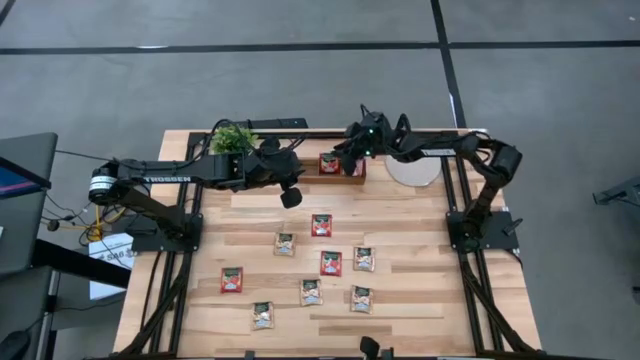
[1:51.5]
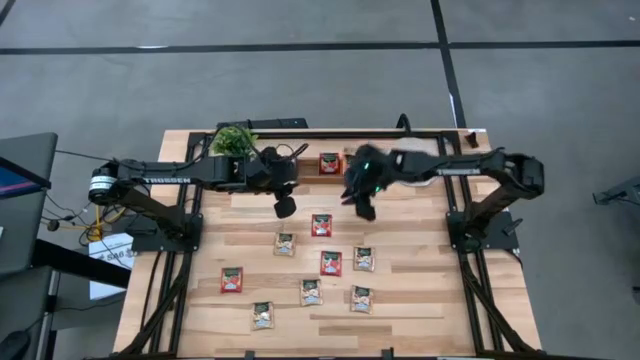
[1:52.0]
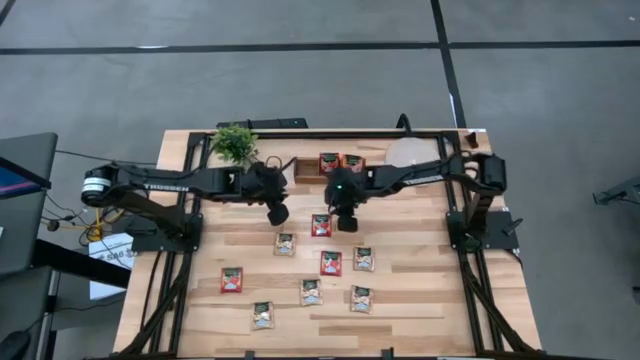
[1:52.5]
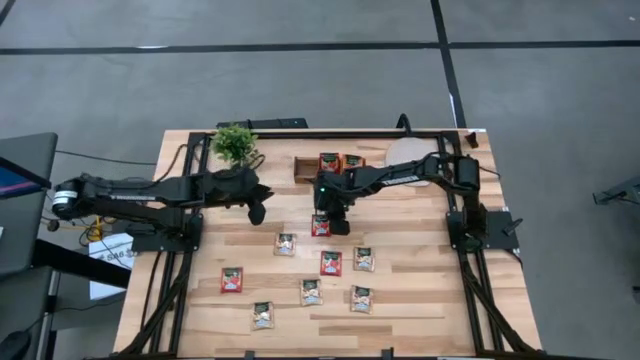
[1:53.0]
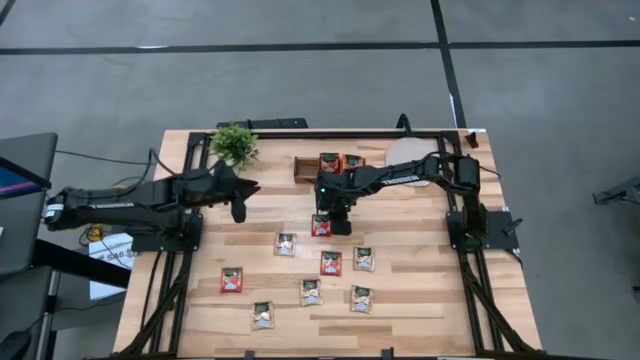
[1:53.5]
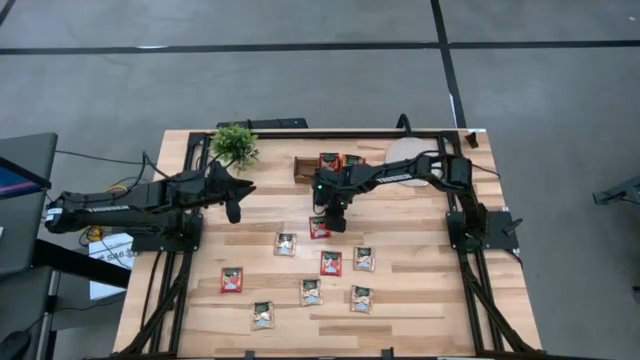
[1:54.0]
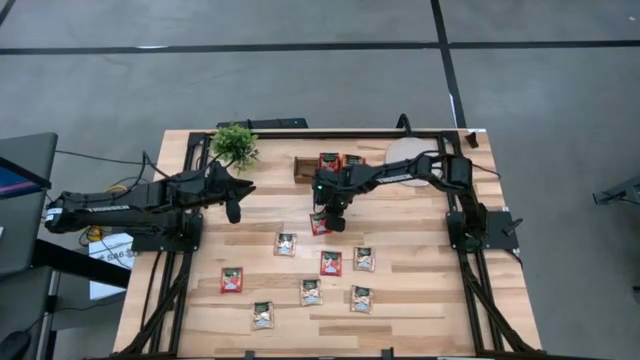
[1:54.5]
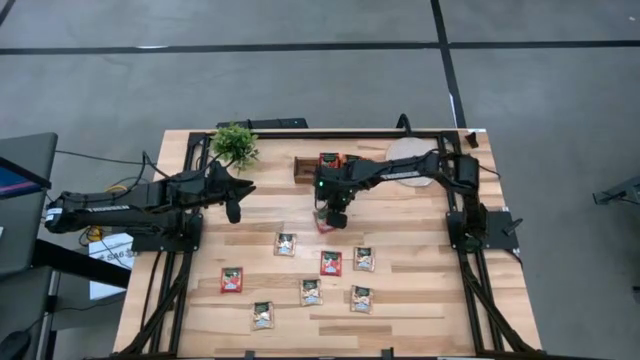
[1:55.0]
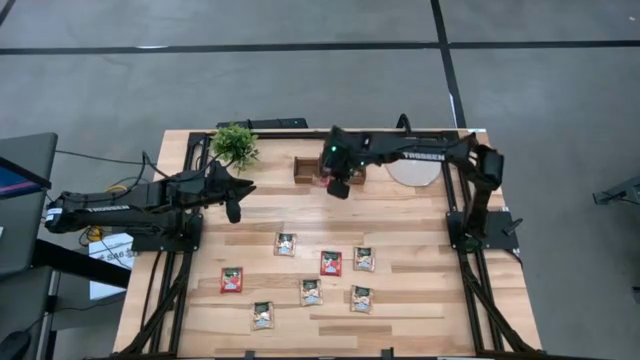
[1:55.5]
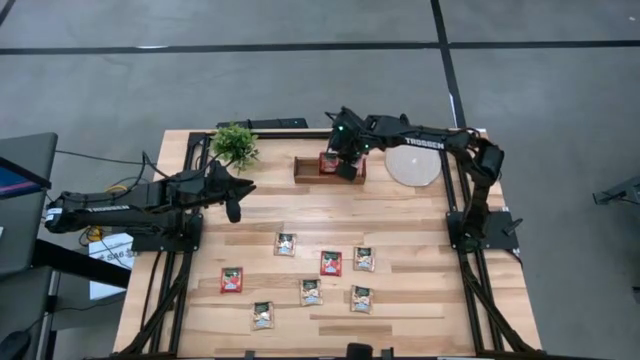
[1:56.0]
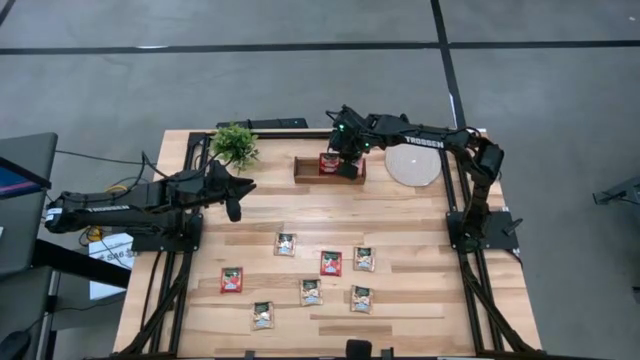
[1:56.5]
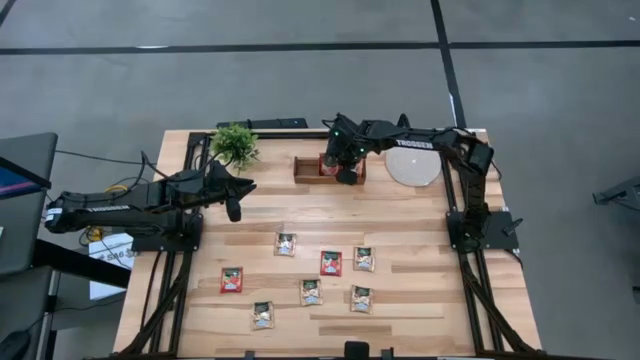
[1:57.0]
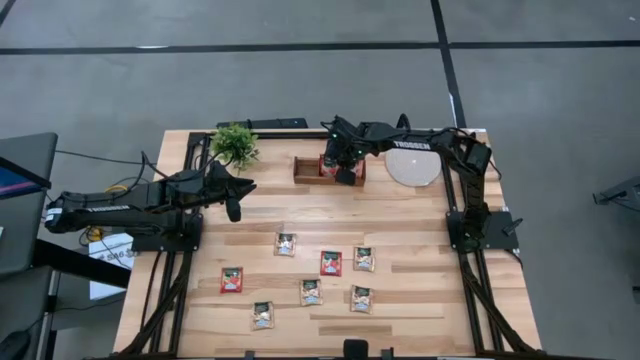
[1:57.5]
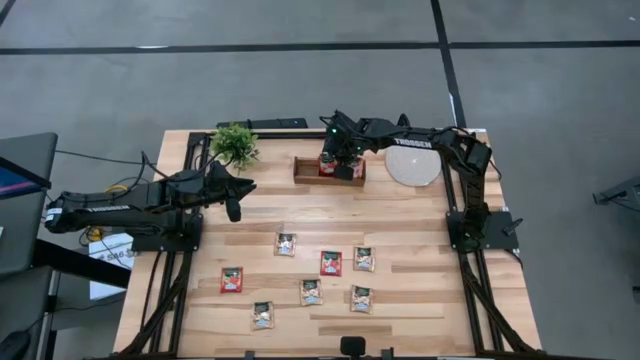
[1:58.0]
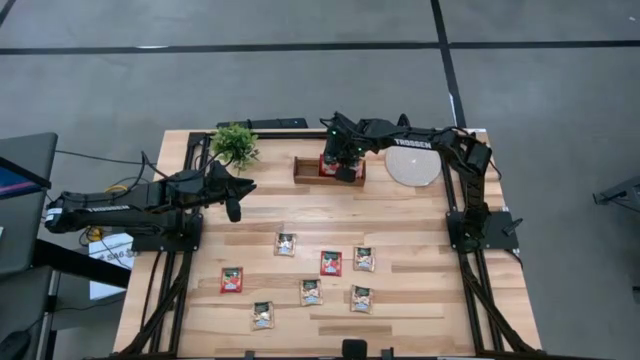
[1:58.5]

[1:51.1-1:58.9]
Task: Pick & Place Tea
Put the red tea bag into the middle section of the wooden organizer

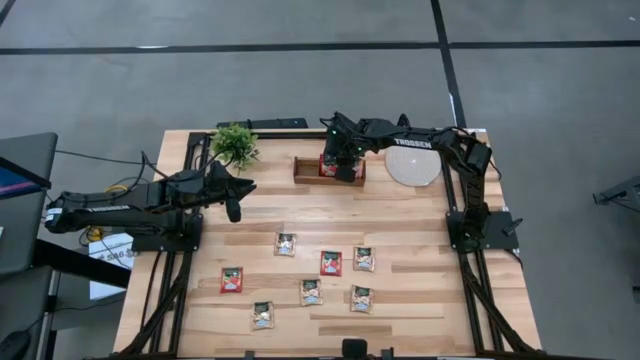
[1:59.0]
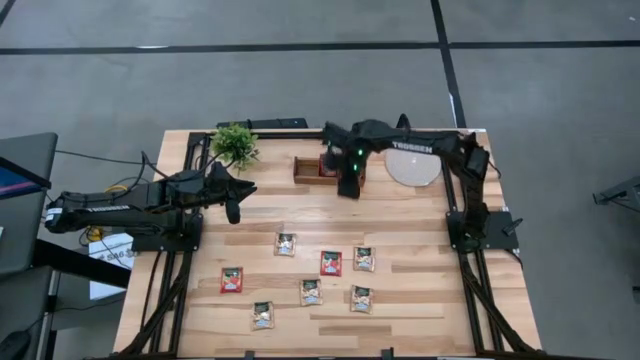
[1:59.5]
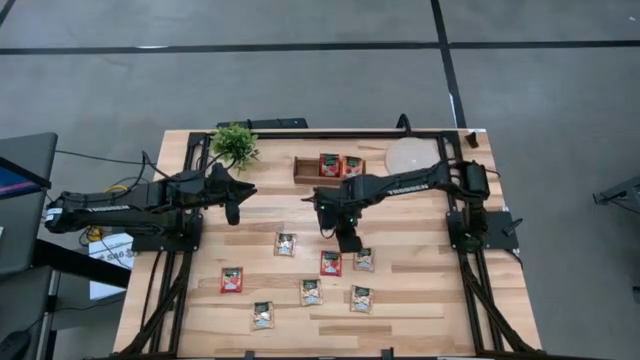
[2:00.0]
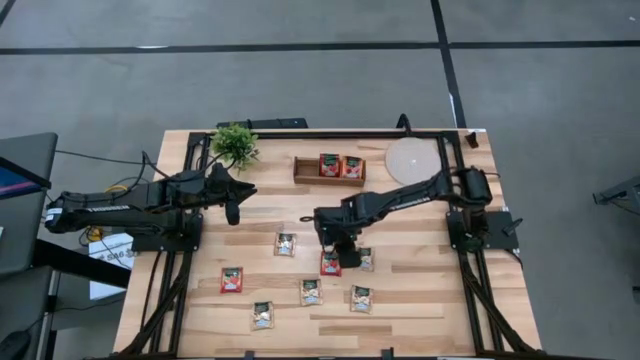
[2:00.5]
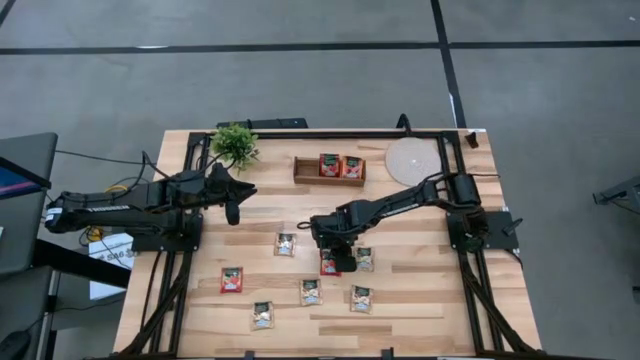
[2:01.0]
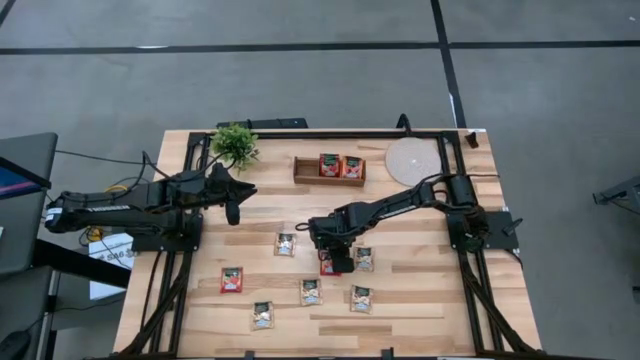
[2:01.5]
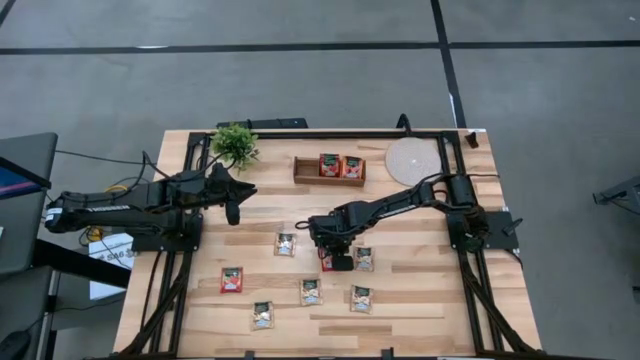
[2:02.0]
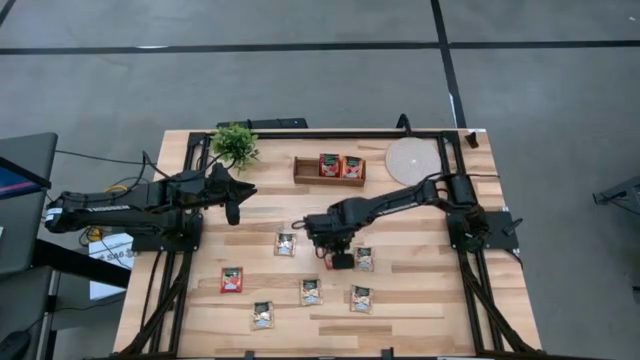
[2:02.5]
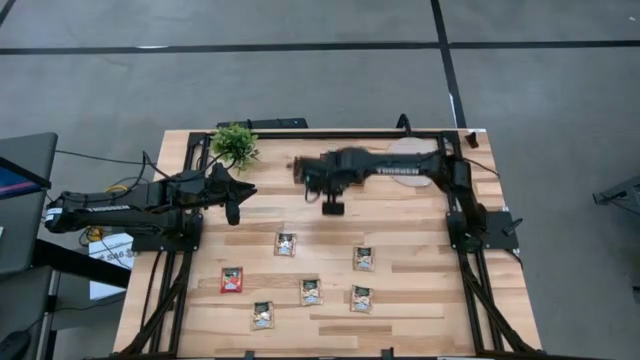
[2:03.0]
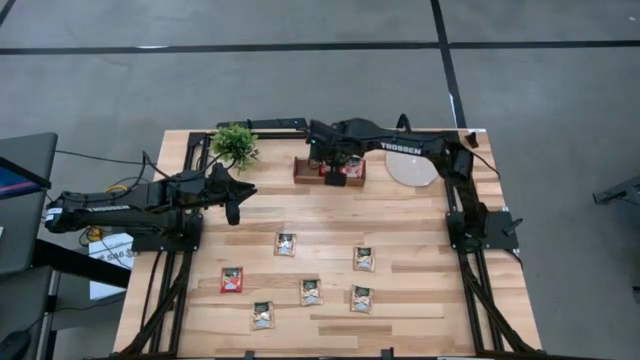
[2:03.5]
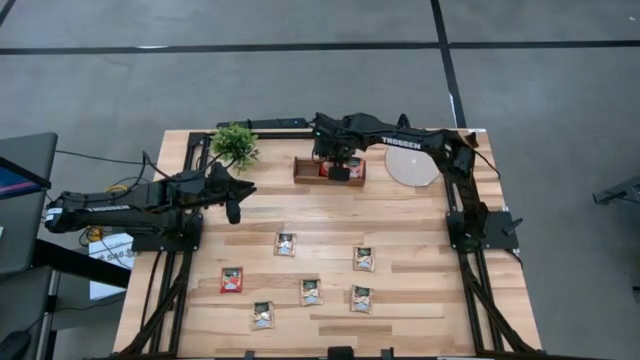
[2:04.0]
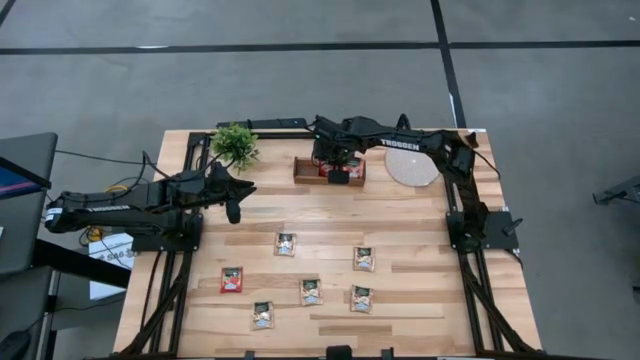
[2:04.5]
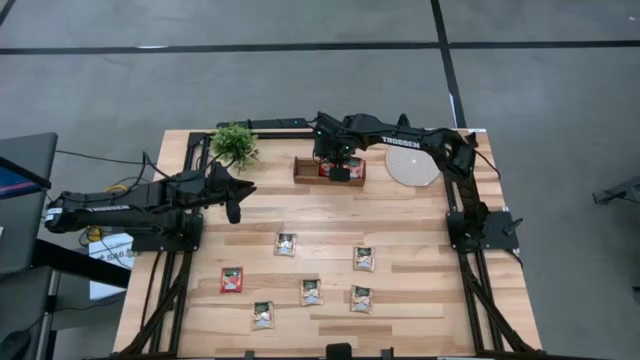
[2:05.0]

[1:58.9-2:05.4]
Put the red tea bag into the middle section of the wooden organizer

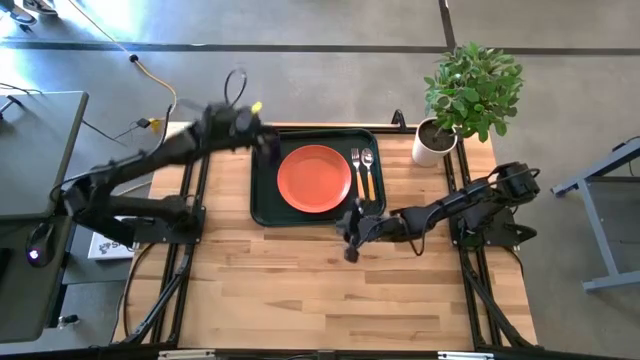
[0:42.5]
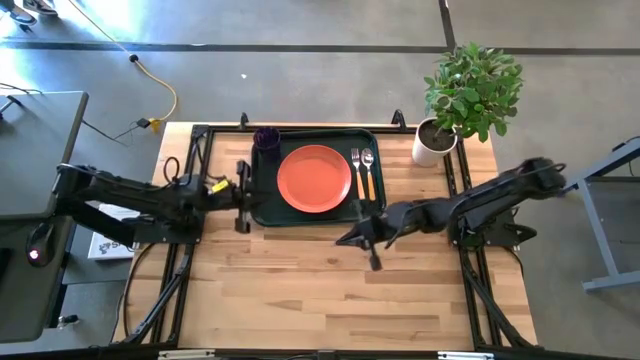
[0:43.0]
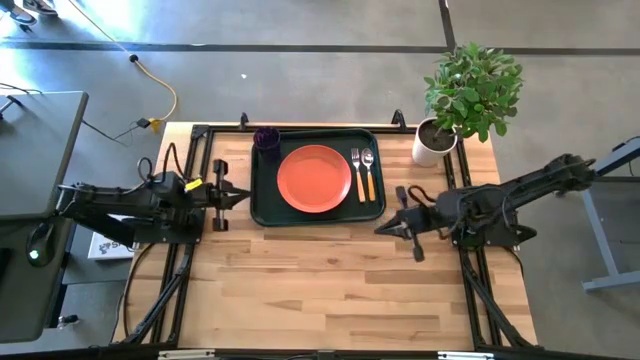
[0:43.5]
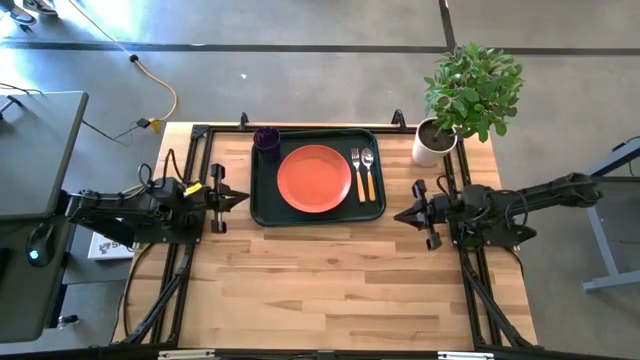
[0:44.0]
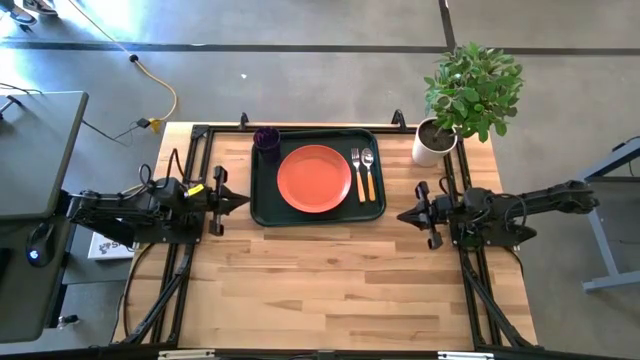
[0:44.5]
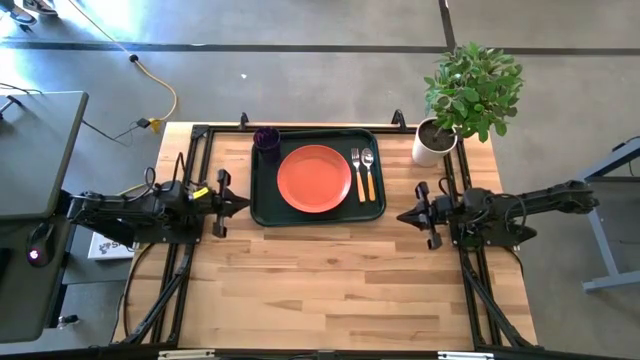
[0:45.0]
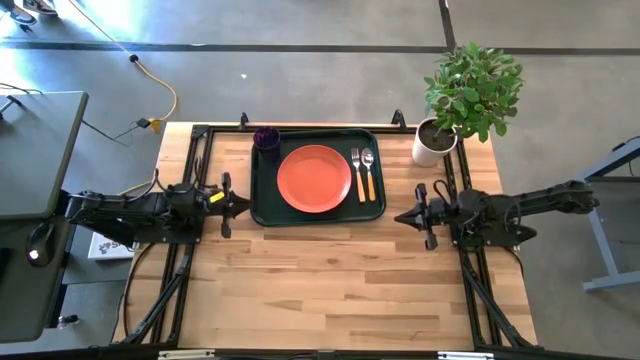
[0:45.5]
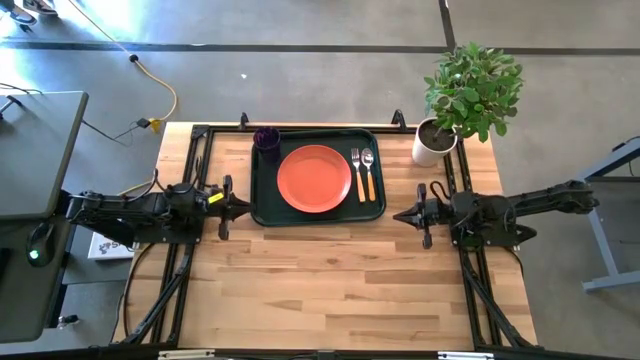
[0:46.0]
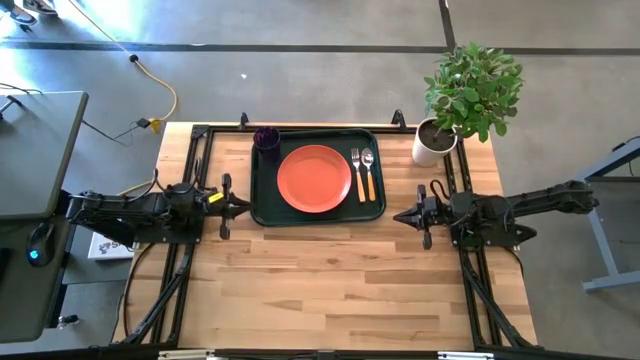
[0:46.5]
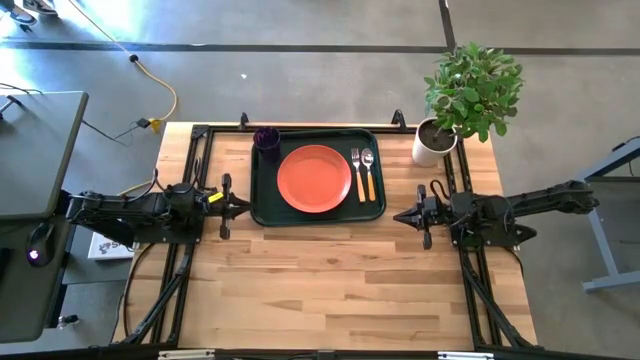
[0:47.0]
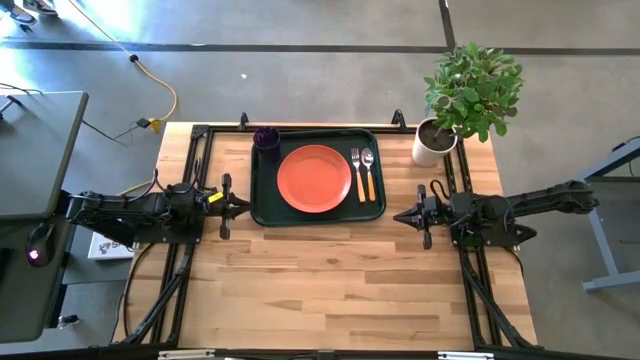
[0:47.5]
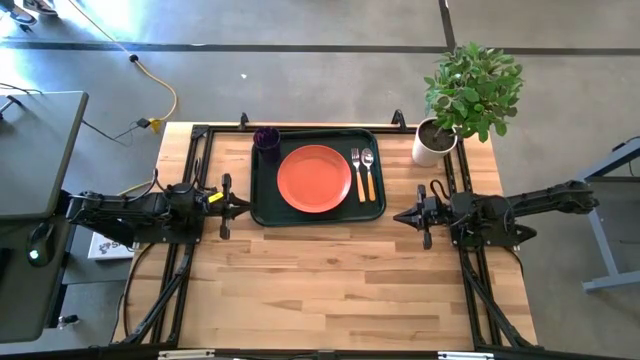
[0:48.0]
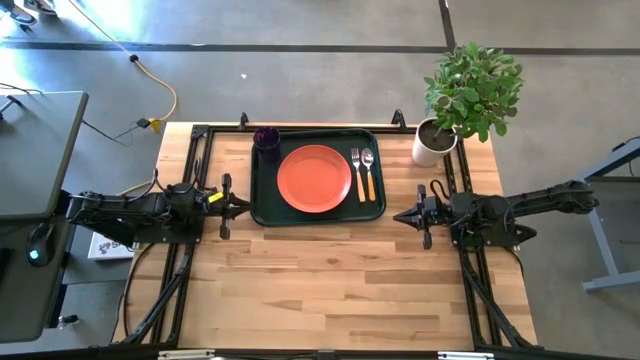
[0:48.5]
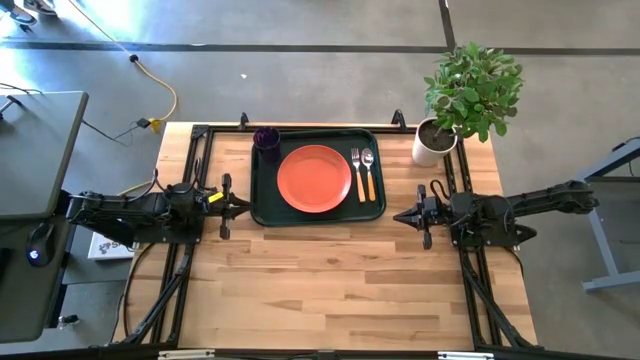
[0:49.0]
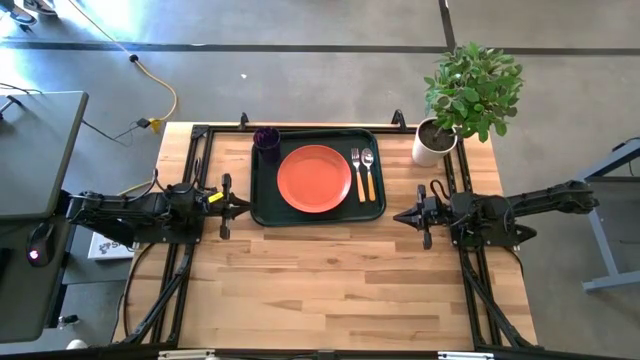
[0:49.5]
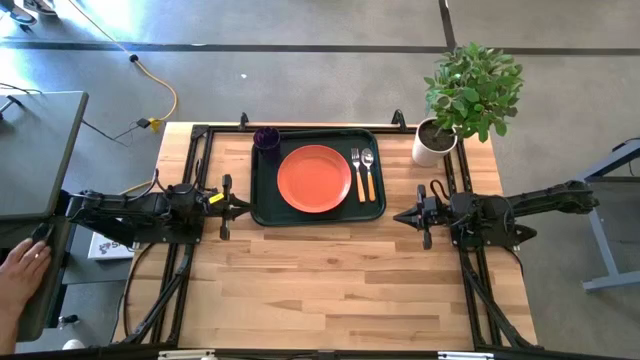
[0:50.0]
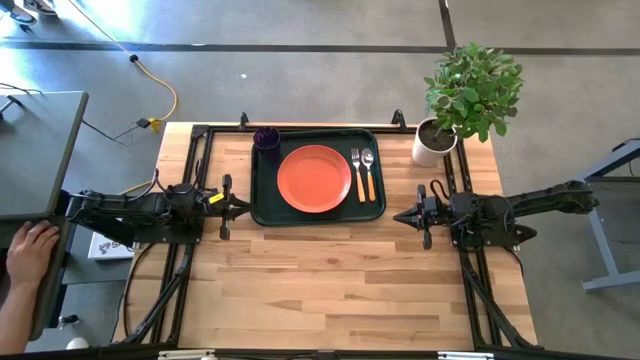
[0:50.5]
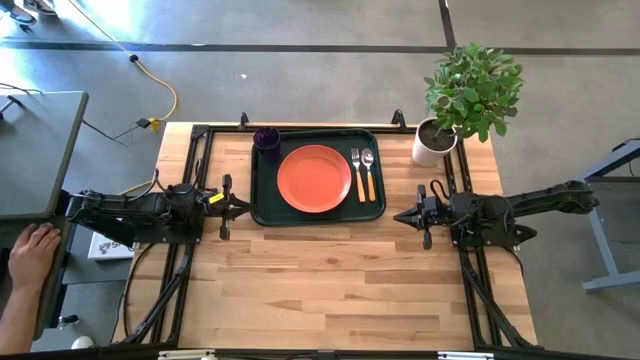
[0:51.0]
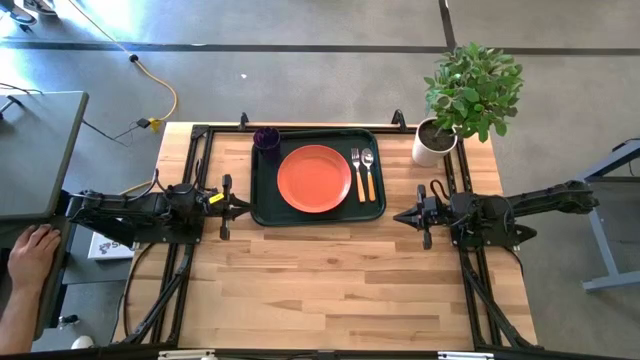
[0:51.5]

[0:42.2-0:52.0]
Task: Pick and place plate/cup/fork/spoon on tray
Return to Home Position
